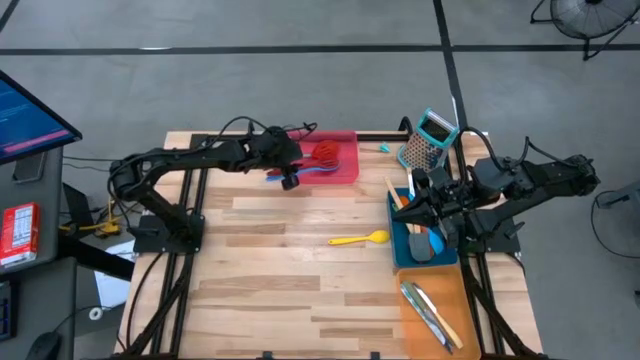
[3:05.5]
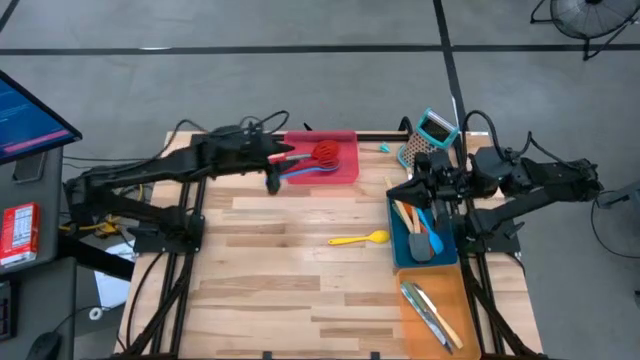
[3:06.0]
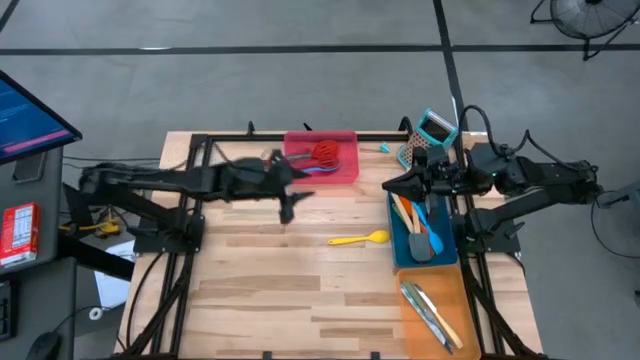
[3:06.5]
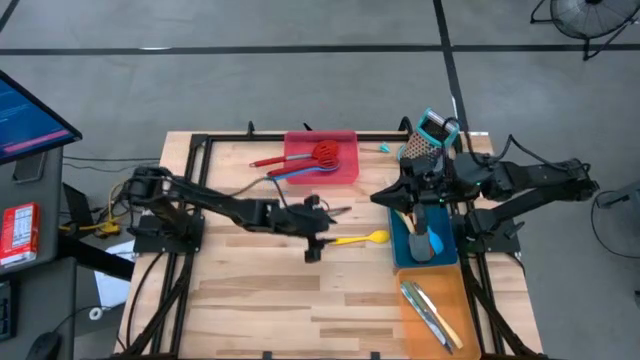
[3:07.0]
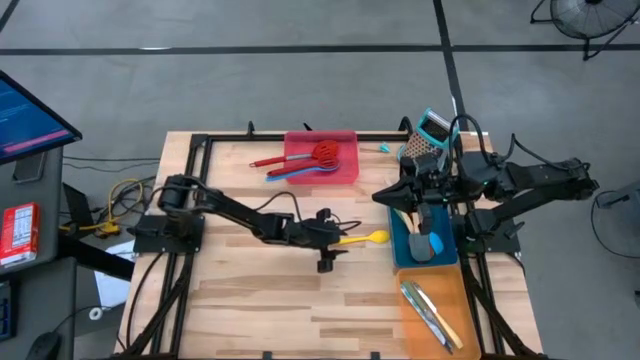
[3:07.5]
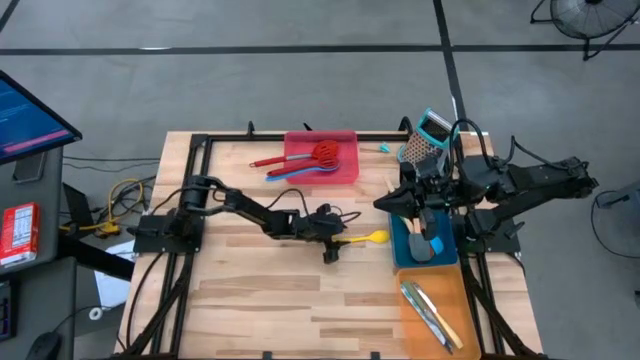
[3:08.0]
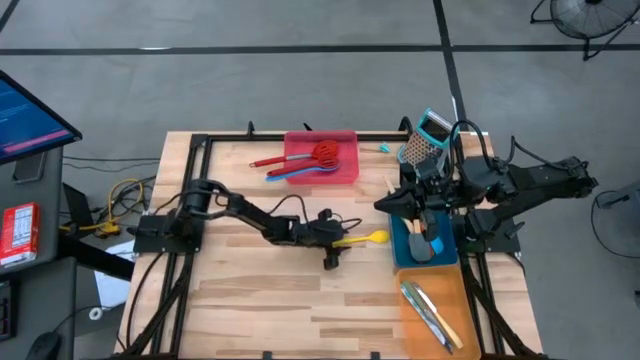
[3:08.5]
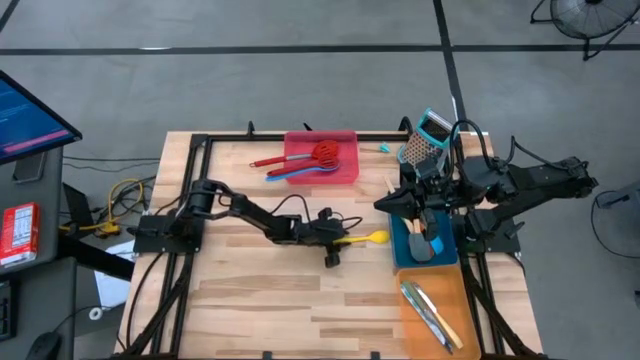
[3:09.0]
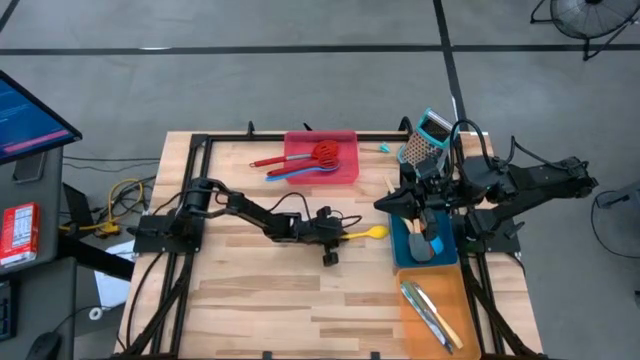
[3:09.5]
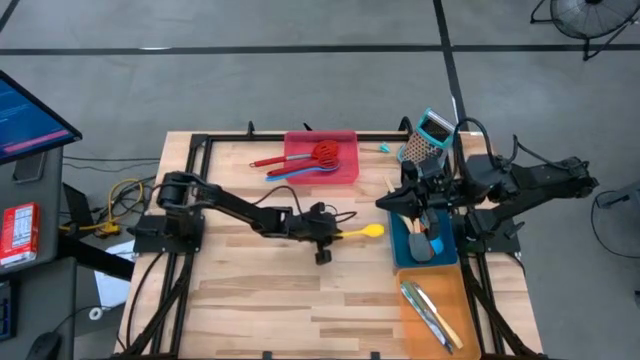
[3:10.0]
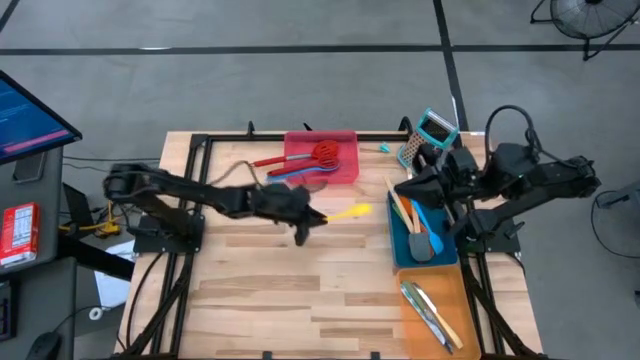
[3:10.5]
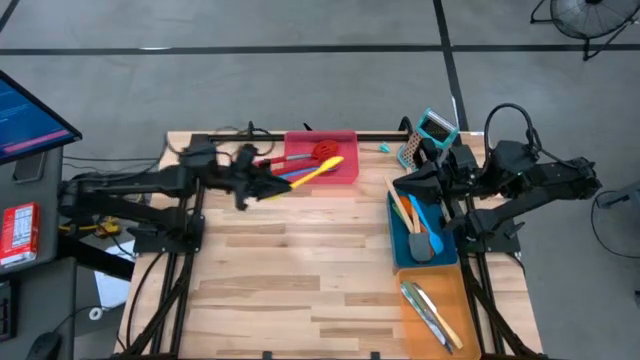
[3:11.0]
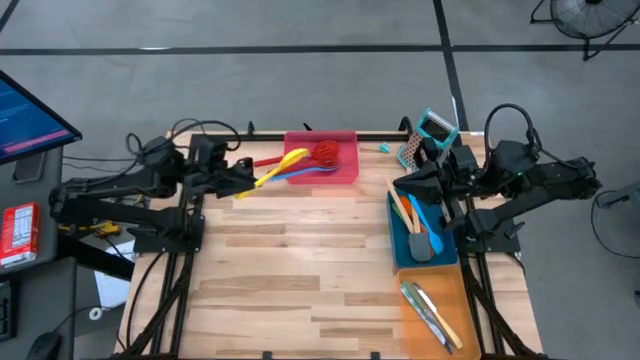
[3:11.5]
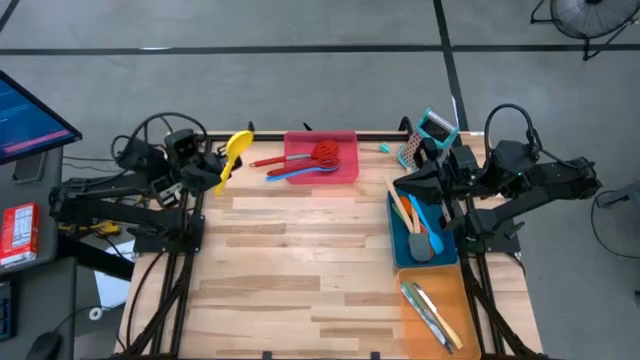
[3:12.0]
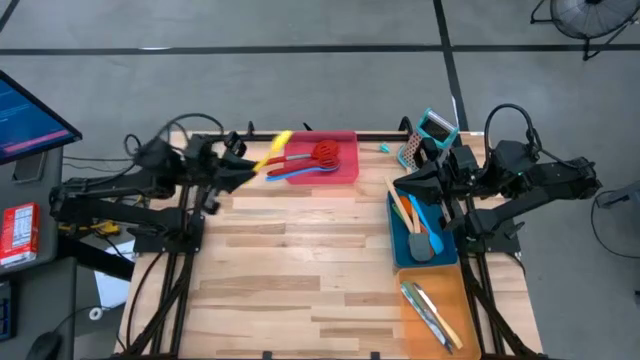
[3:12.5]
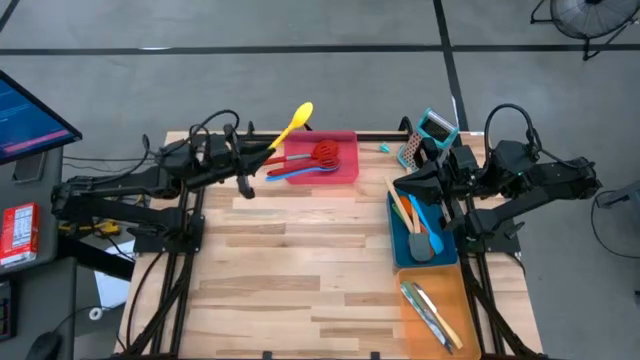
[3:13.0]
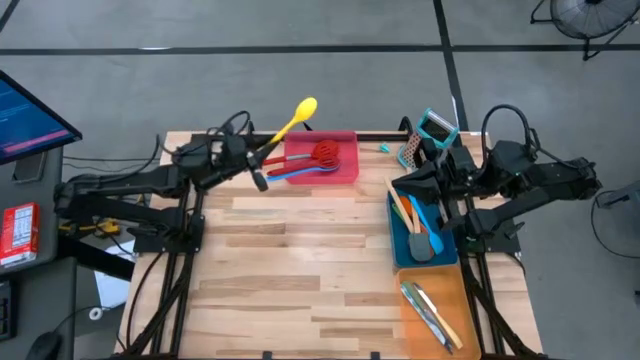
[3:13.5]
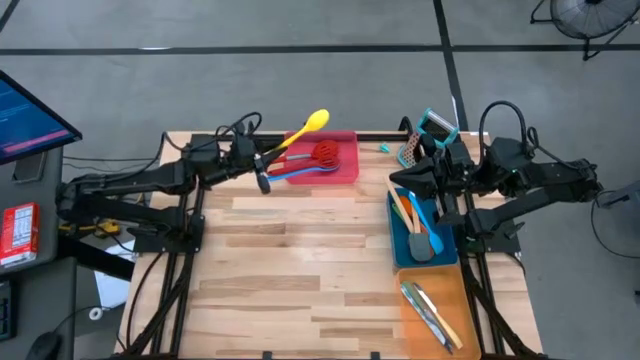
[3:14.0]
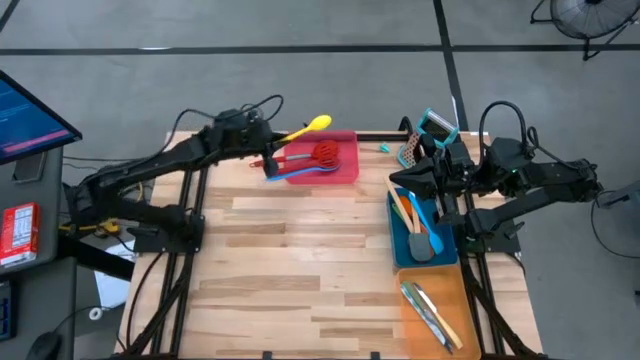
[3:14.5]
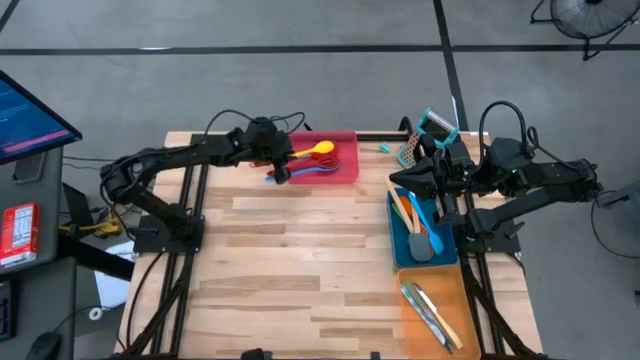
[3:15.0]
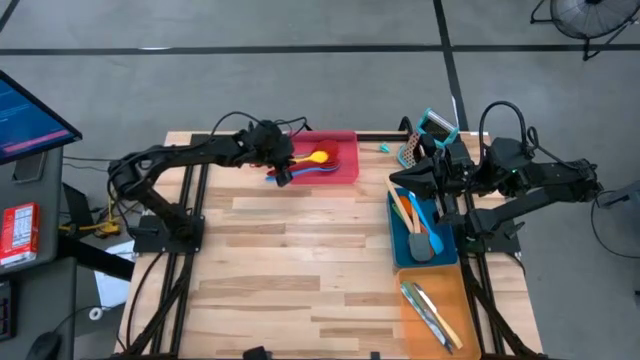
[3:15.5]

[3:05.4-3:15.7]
Task: Pick & Place Kitchen Items
Put the yellow serving spoon into the red bin

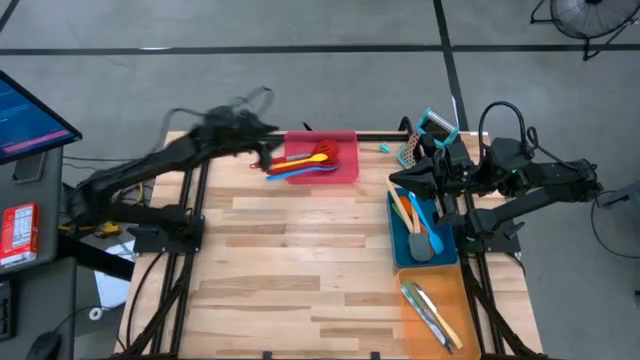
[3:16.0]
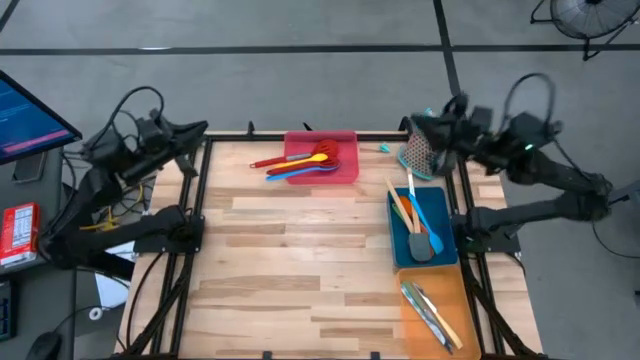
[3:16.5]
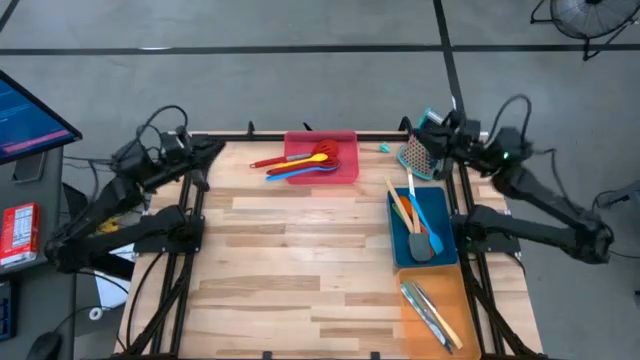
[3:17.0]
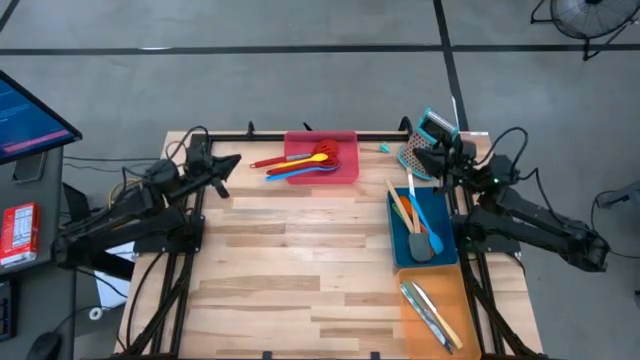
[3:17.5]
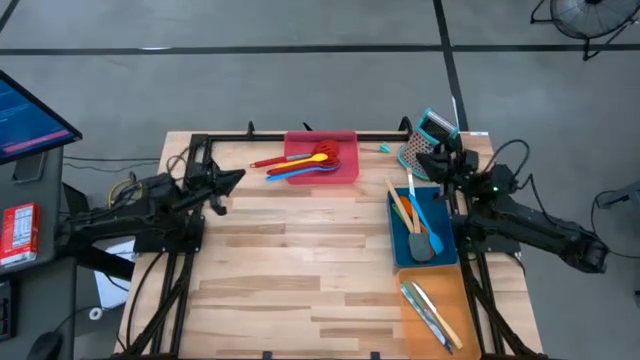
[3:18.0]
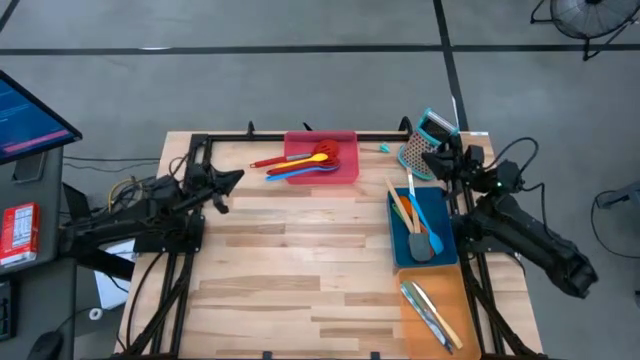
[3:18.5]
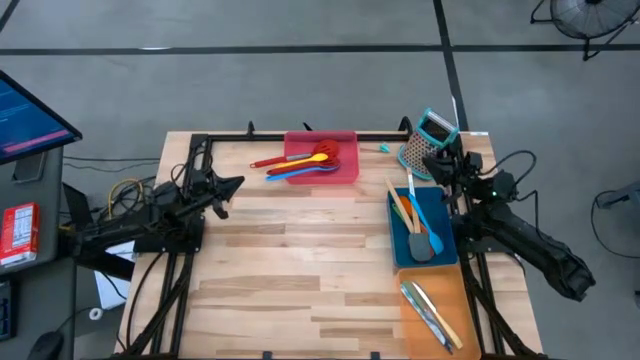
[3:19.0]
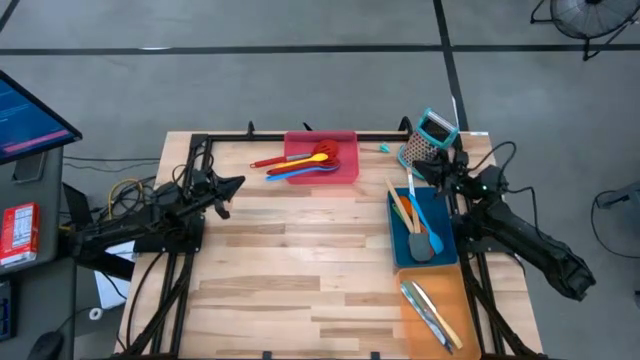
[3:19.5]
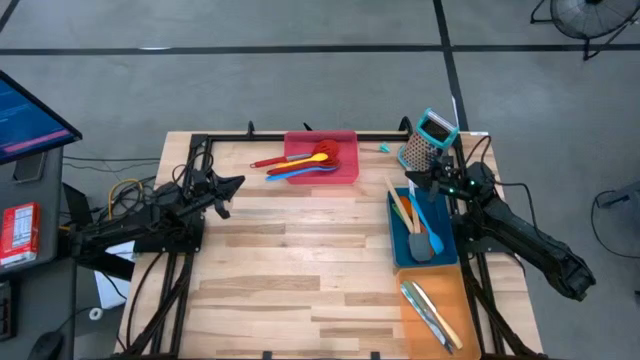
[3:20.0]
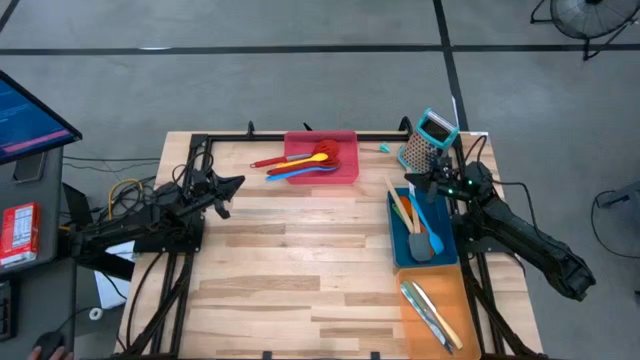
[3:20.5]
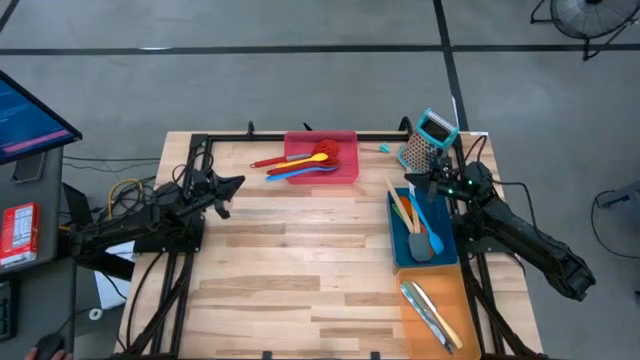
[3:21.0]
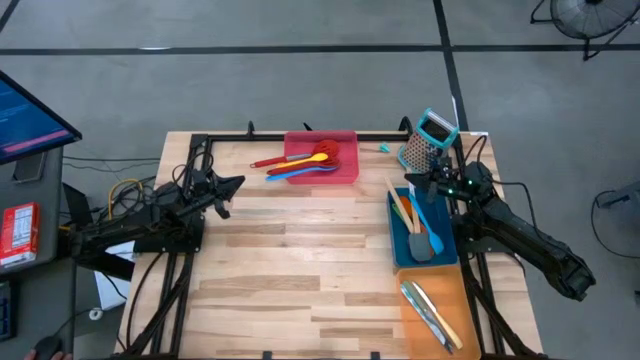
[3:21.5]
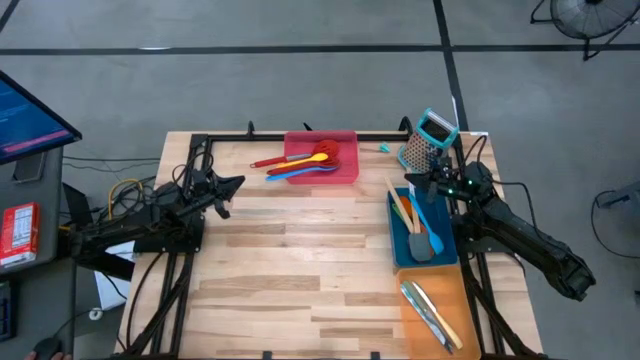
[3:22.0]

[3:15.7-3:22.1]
Return to Home Position

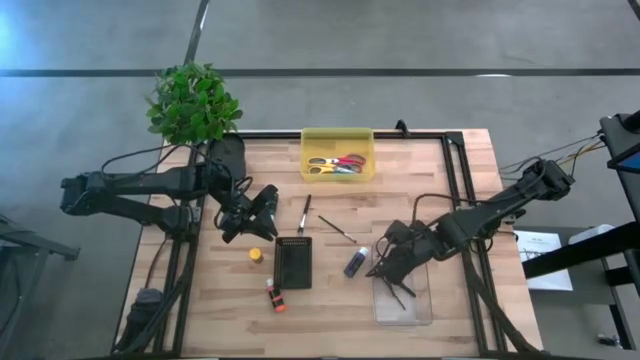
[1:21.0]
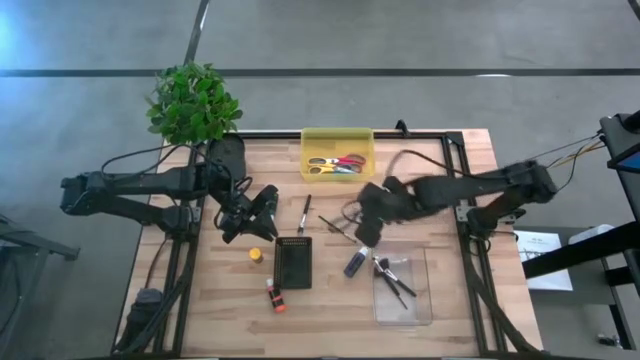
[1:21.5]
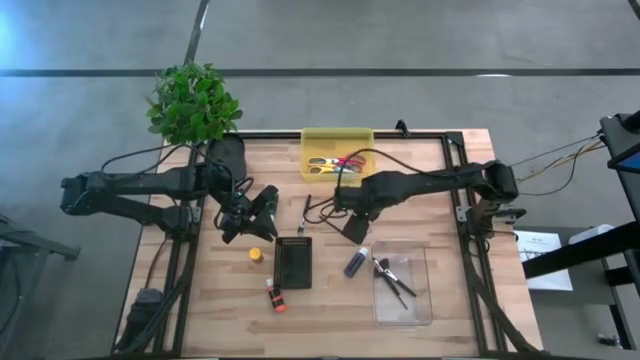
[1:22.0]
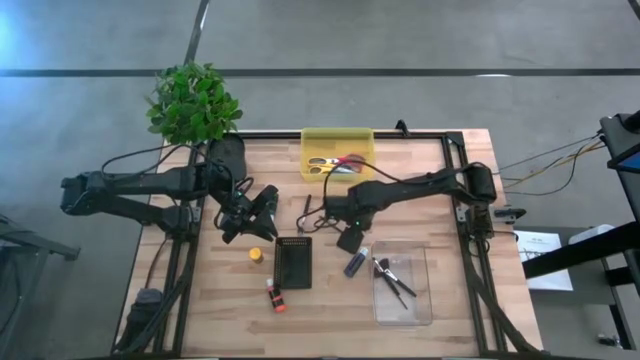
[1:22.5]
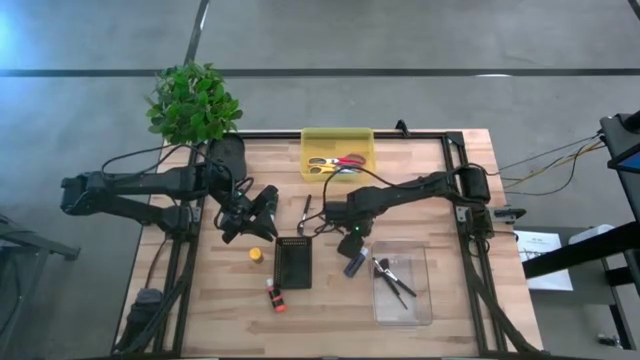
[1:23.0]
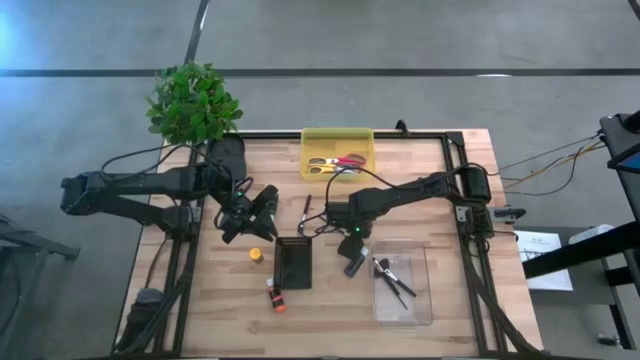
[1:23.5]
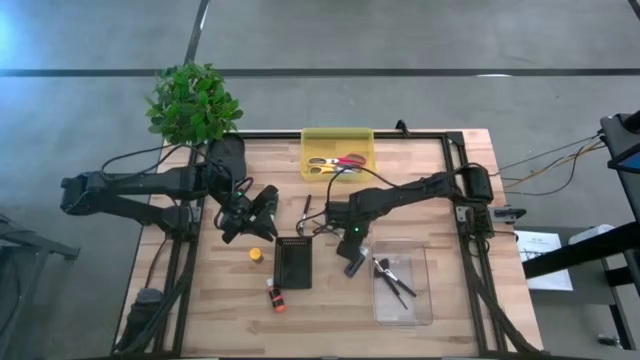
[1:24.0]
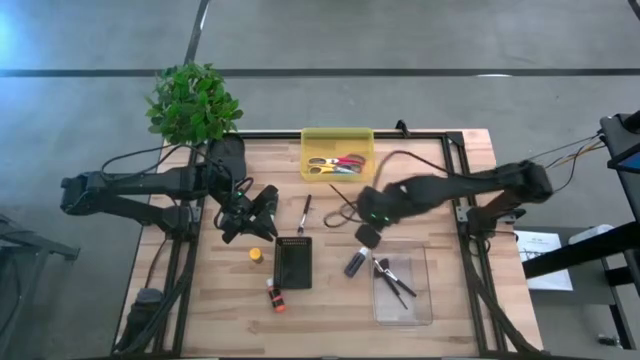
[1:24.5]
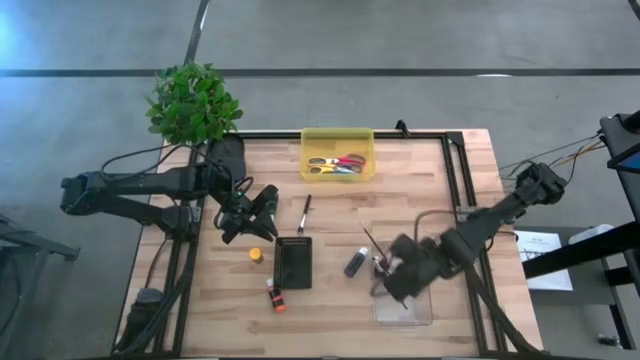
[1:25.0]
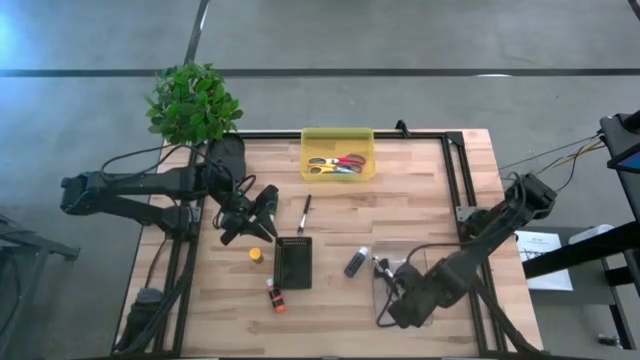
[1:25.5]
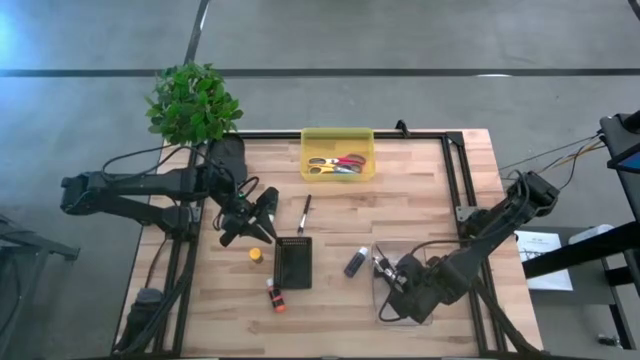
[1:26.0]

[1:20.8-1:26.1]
Task: Pick & Place Paint Supplies
Put the eyeliner brush into the transparent bin
